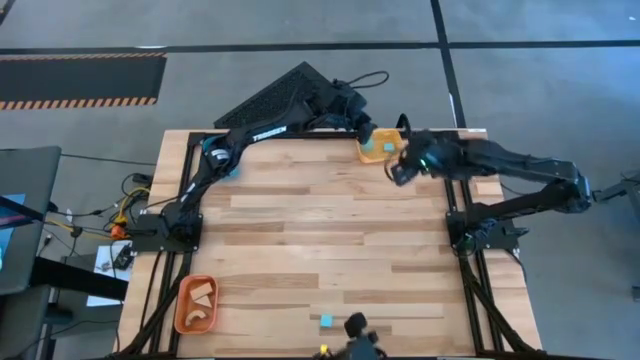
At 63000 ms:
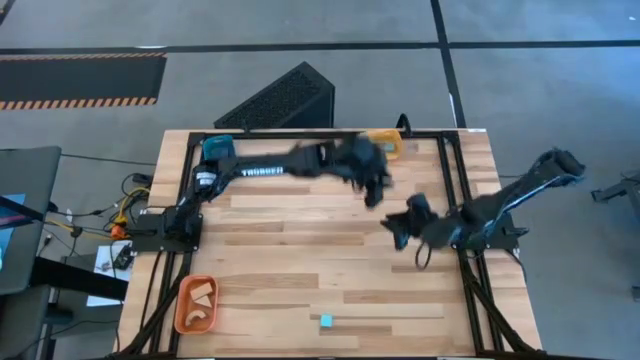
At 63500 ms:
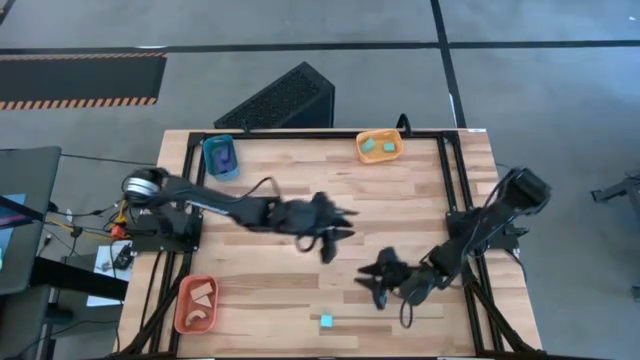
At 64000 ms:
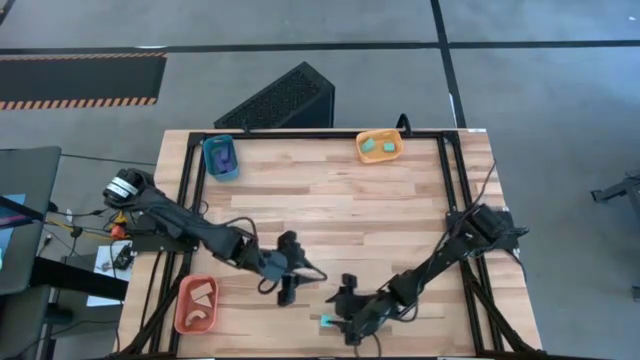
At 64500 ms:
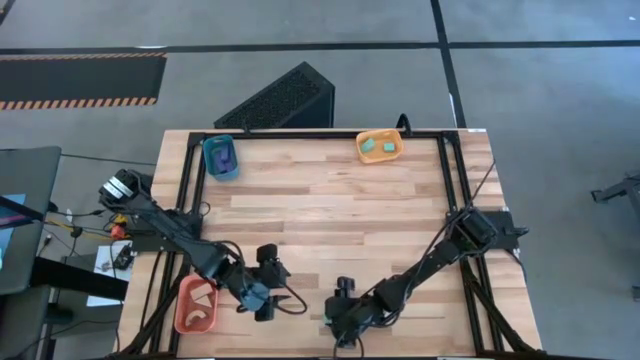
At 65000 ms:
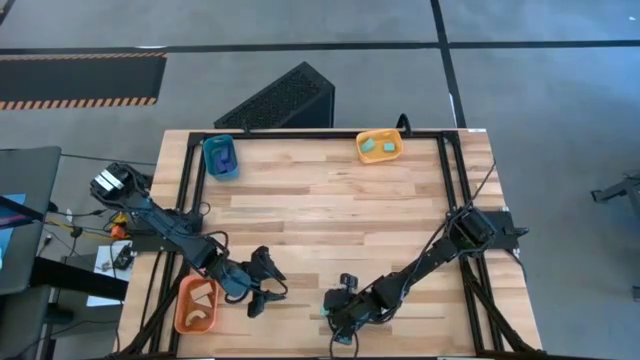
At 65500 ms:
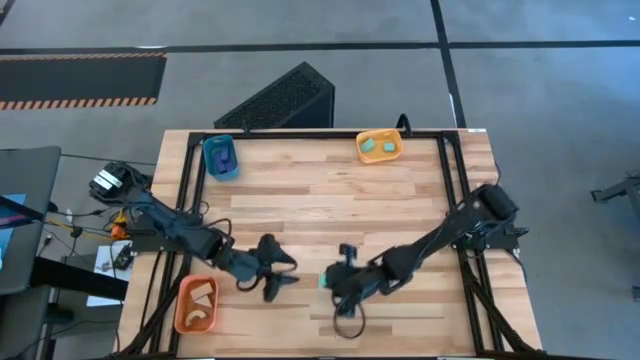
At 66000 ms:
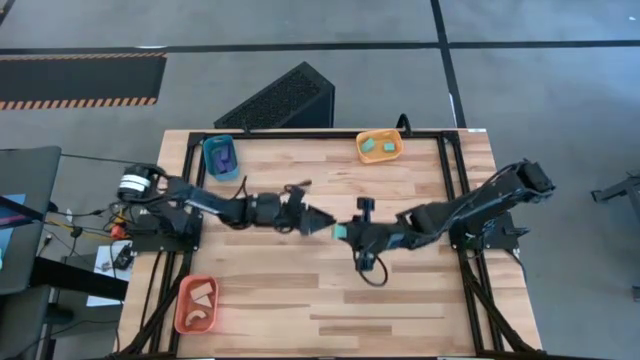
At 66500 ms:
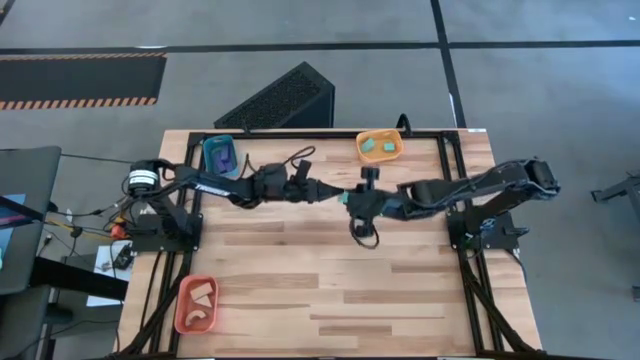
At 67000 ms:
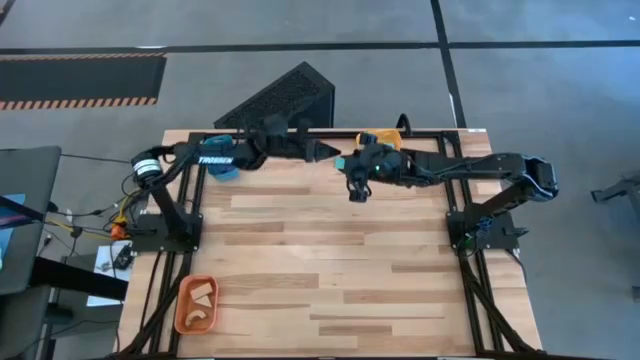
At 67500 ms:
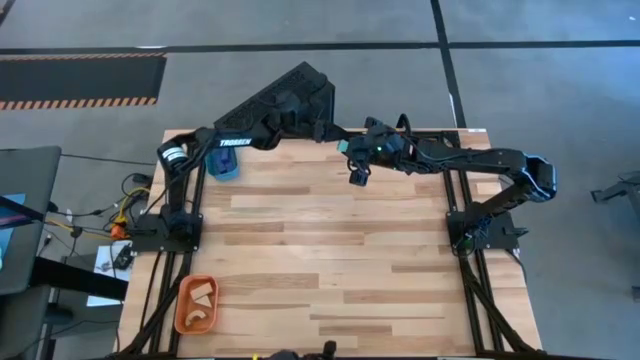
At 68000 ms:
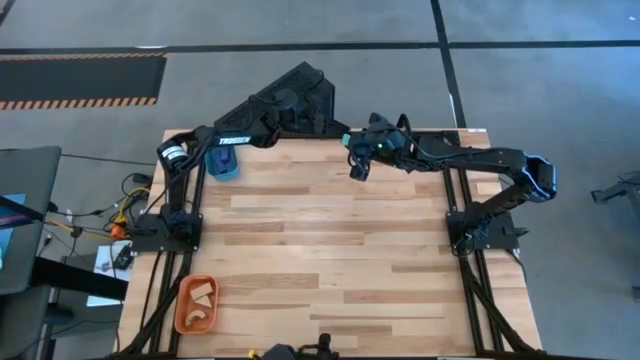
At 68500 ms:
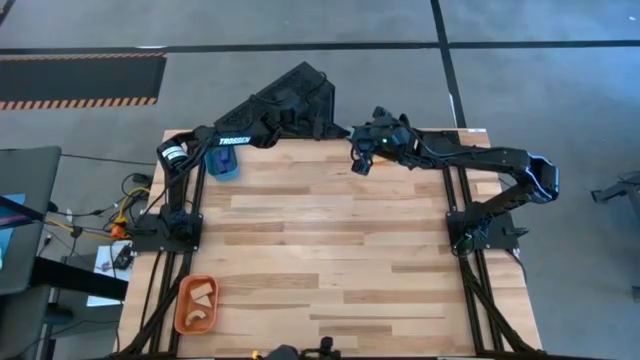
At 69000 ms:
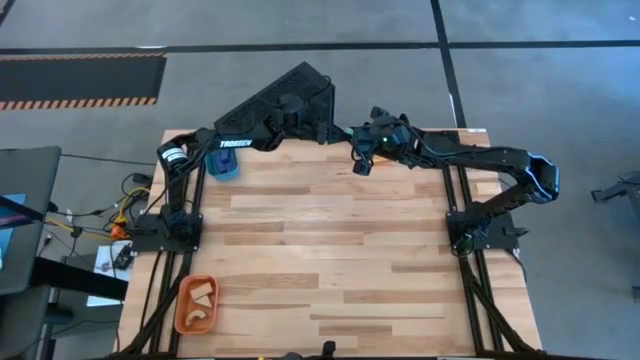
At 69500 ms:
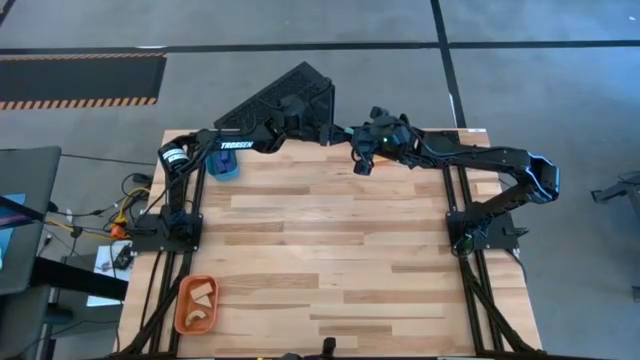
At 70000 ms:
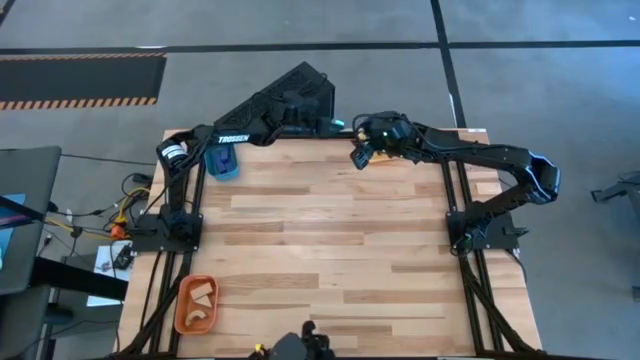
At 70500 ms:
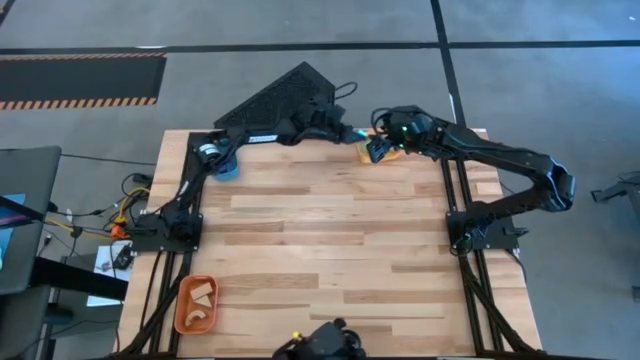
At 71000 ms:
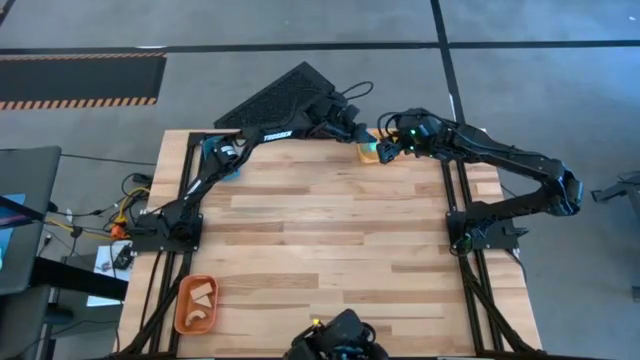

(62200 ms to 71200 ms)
Task: Sort & place blocks by color
Put the light blue block into the yellow bin

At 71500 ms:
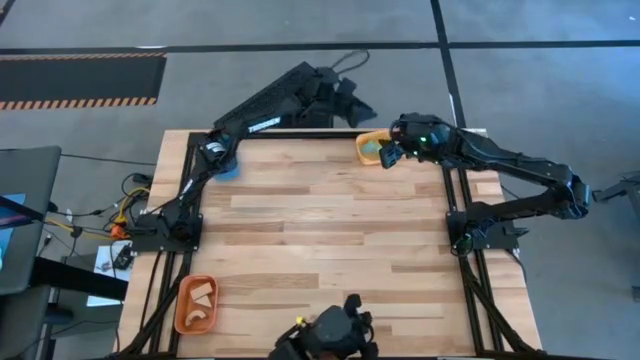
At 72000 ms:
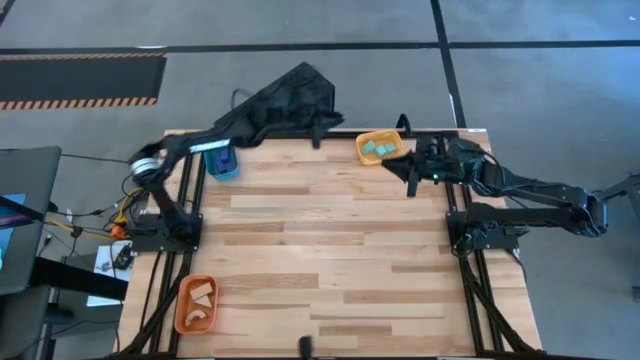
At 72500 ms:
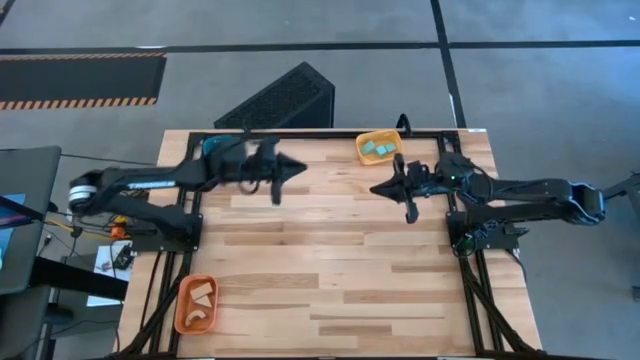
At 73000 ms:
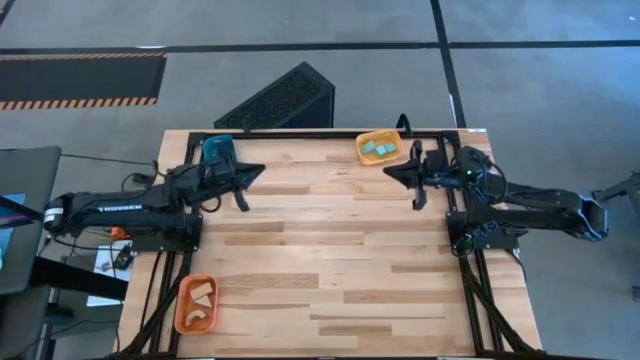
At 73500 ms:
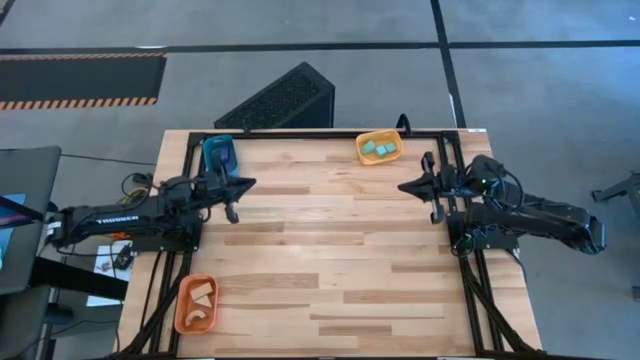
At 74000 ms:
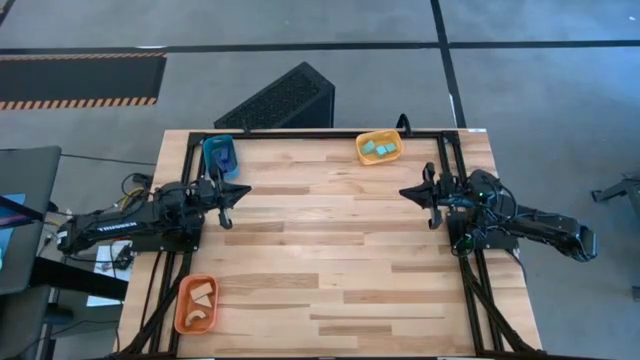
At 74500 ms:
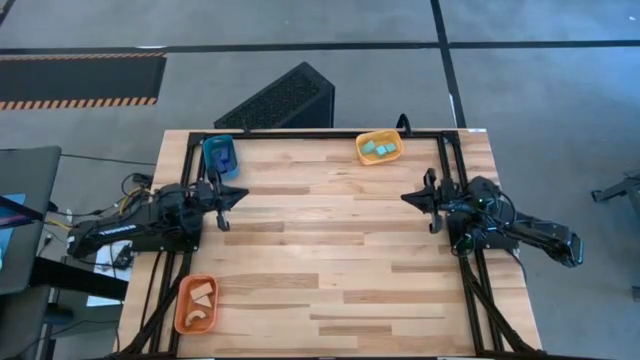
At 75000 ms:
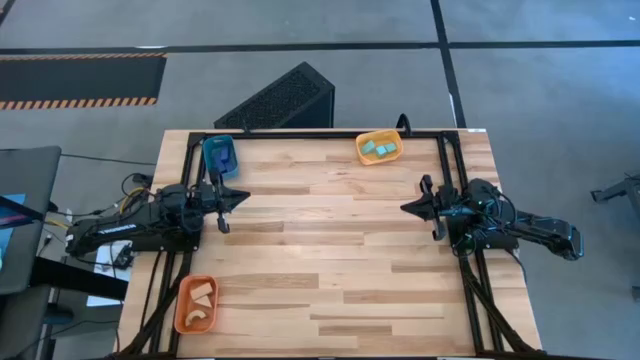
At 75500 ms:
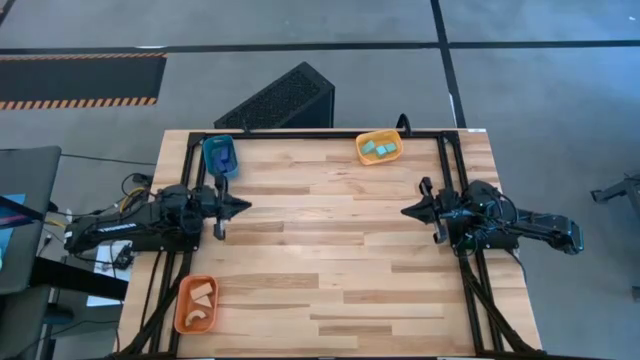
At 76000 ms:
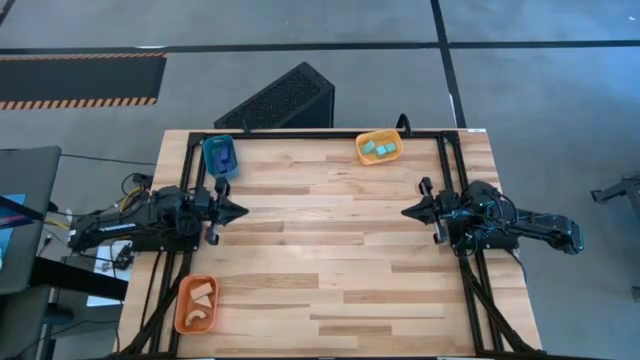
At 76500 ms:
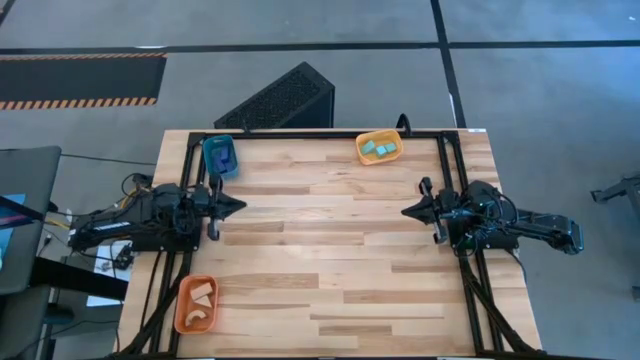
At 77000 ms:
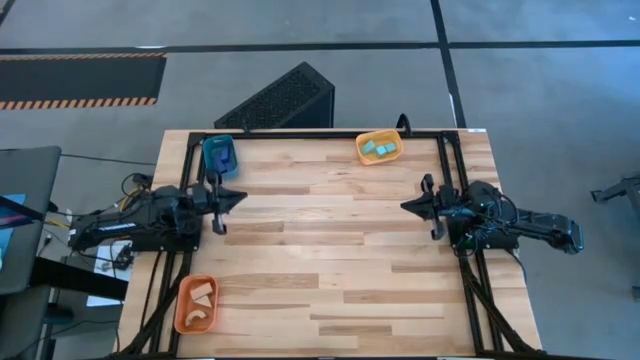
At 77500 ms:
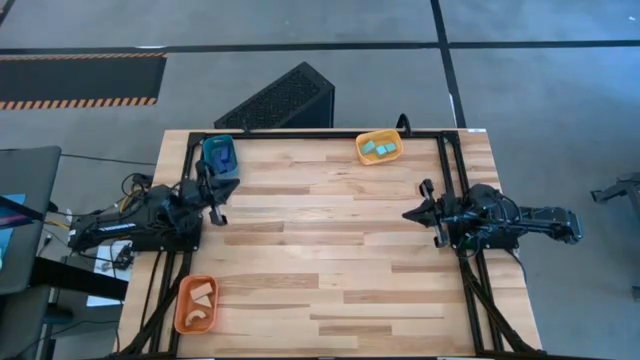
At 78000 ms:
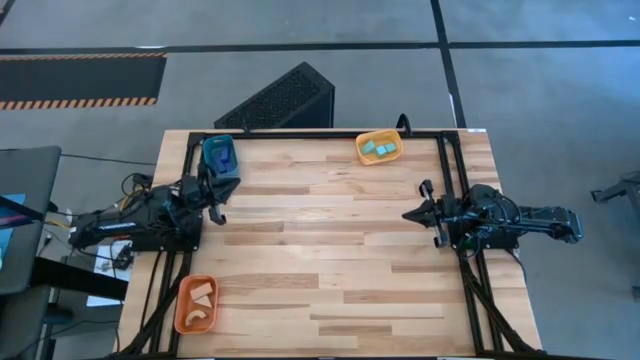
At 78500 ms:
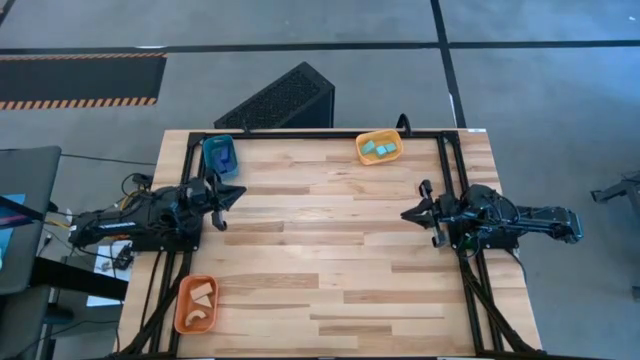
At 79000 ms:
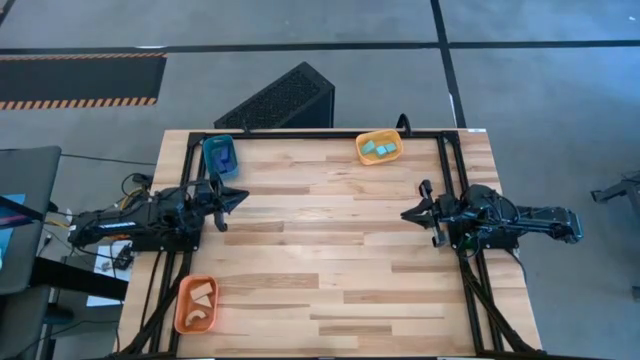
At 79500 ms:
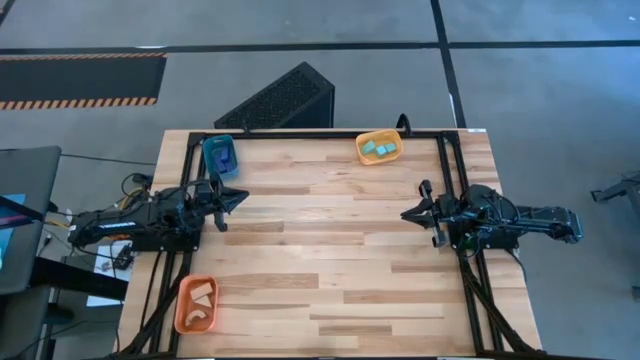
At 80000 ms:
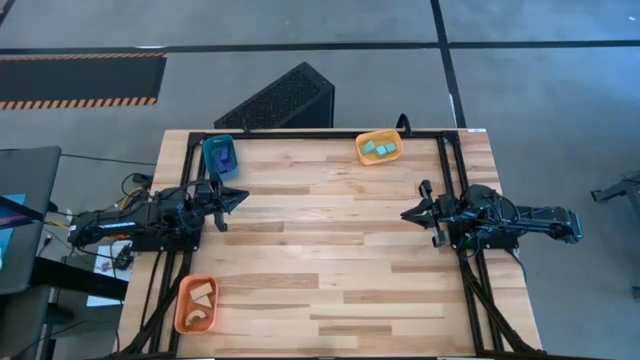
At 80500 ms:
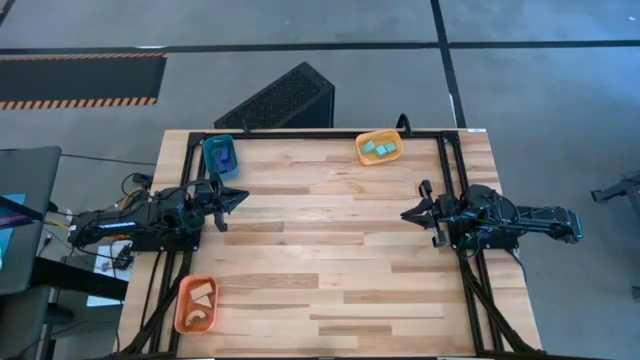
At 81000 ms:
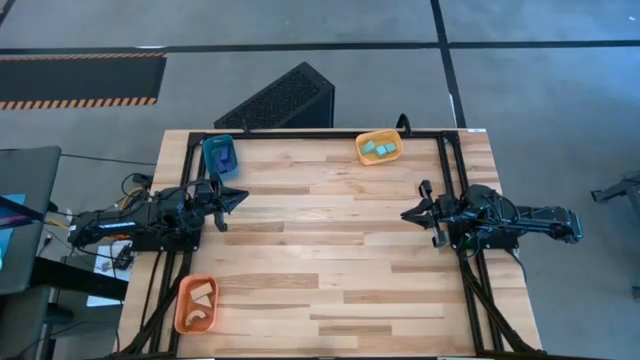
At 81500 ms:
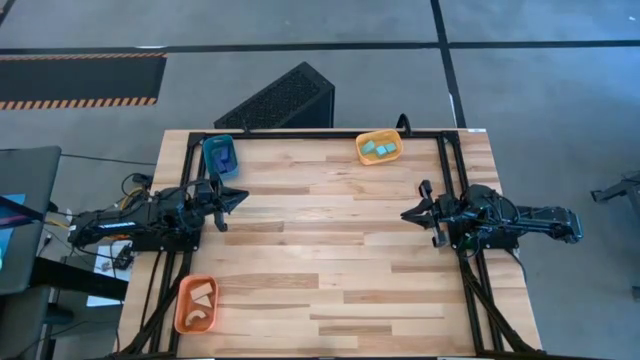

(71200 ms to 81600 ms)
Return to Home Position
